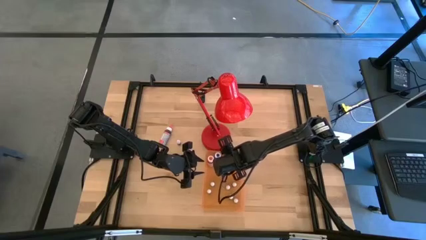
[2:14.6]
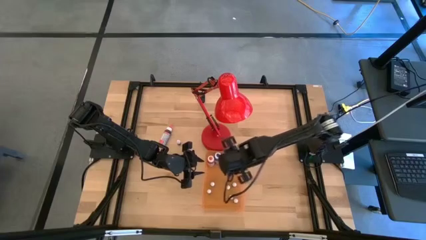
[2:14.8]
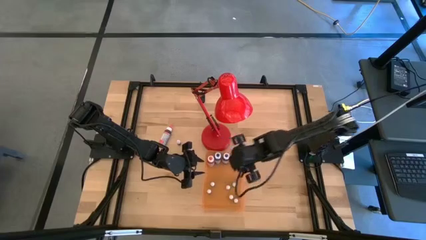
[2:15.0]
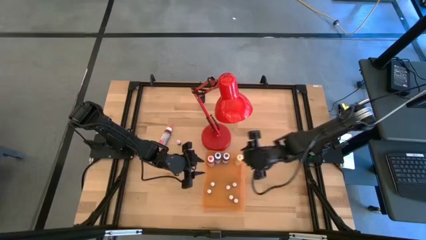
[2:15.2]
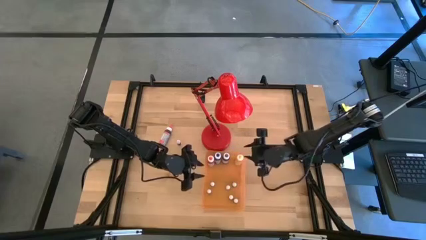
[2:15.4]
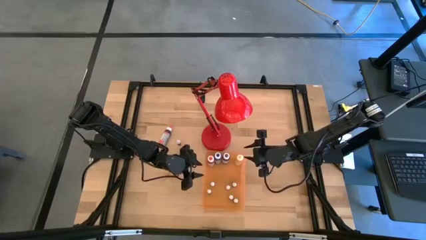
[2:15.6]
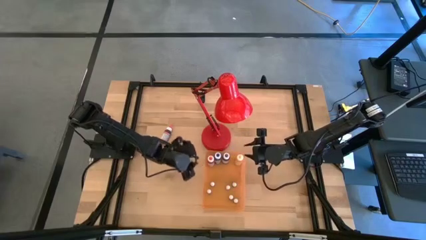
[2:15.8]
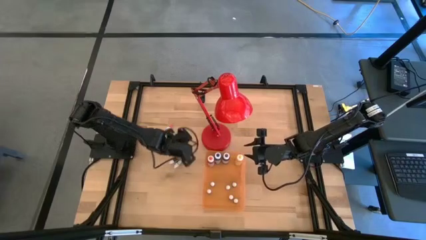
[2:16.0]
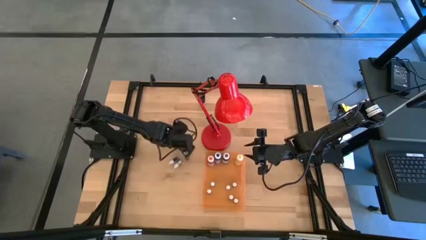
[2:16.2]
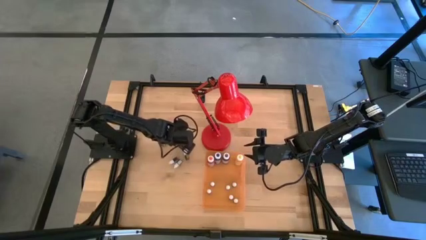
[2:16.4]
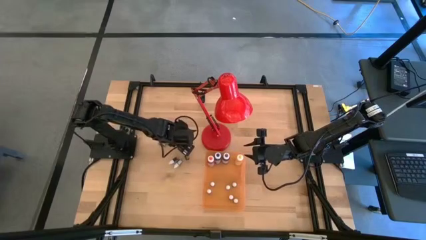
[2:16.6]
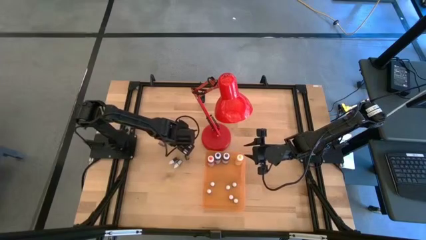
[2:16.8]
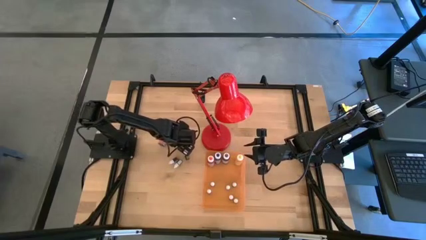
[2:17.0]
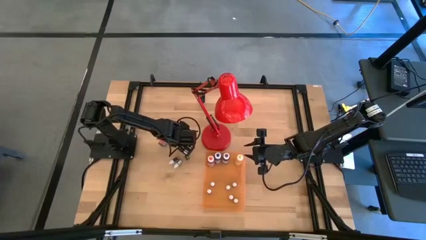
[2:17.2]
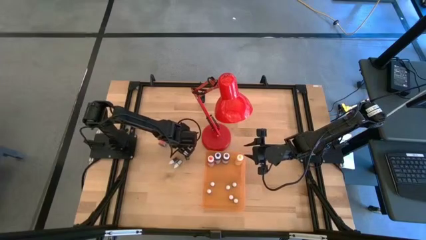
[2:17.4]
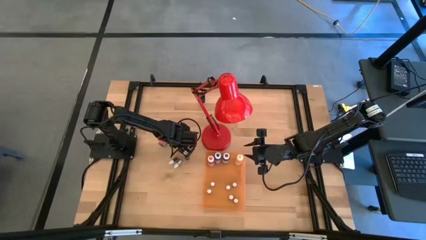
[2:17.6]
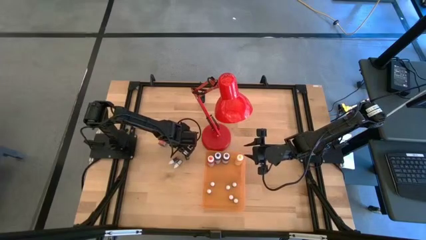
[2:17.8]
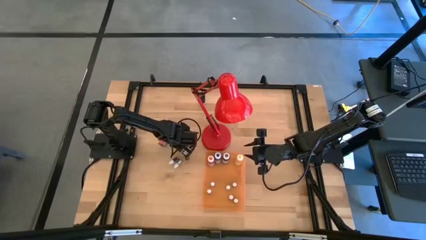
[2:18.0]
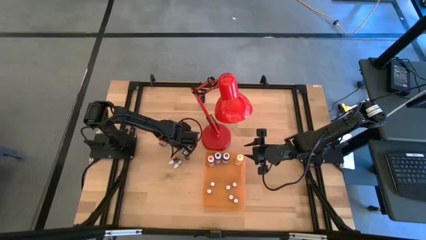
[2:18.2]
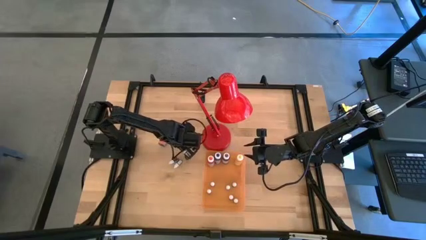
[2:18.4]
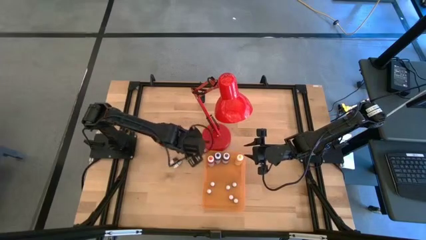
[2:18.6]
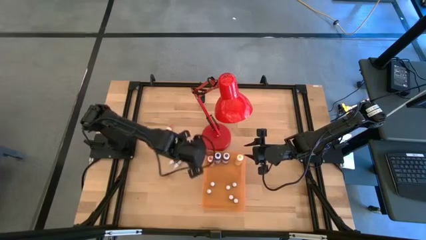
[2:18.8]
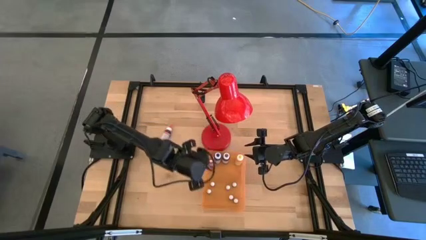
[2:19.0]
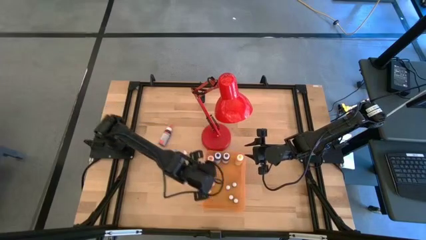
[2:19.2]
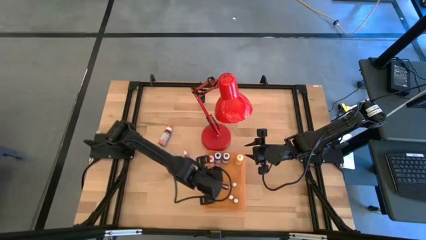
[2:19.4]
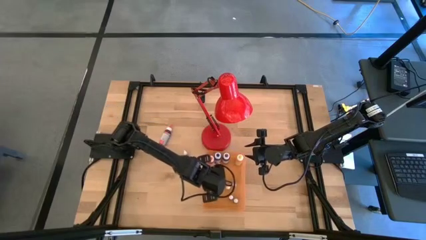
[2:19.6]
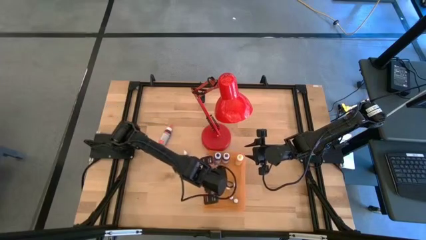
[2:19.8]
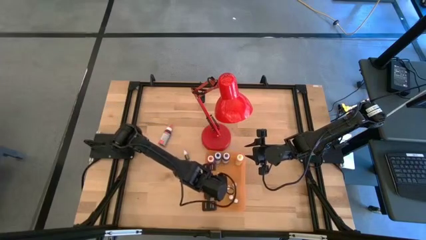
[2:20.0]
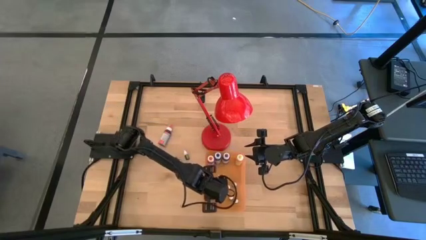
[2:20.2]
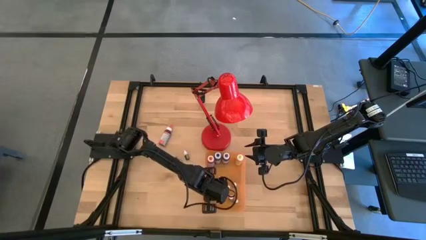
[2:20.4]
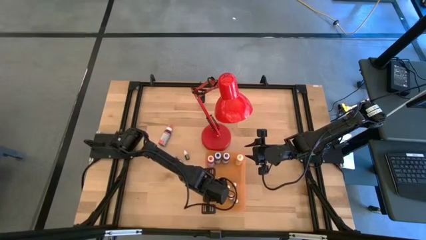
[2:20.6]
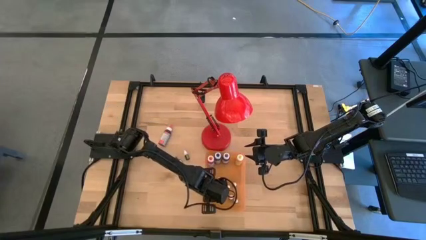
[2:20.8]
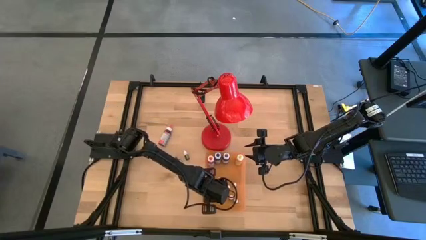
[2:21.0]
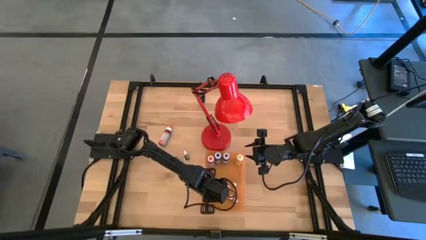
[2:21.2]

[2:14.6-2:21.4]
Task: Pick & Place food coloring
Put the top small black food coloring bottle into the orange bin

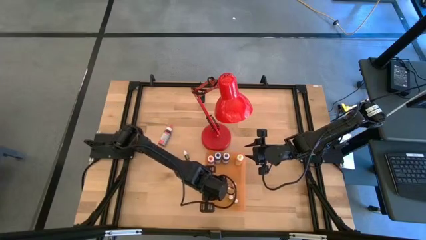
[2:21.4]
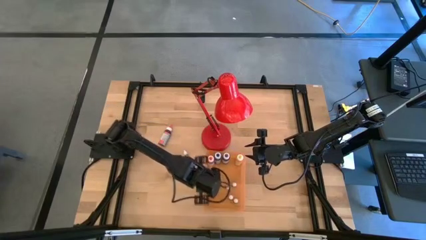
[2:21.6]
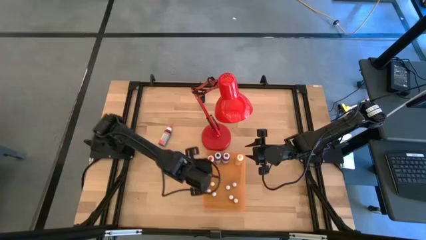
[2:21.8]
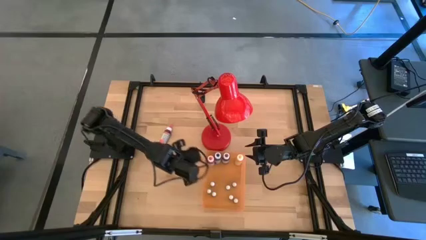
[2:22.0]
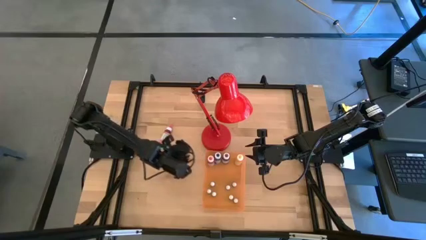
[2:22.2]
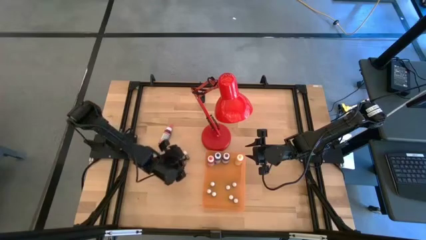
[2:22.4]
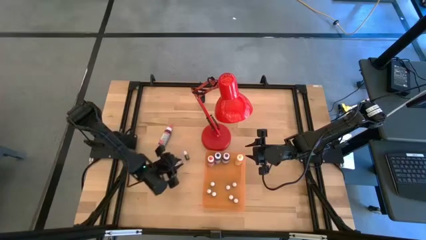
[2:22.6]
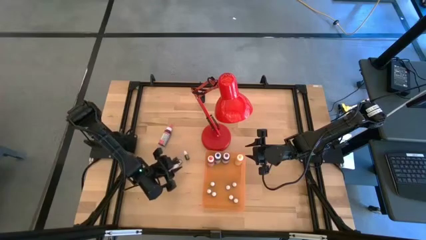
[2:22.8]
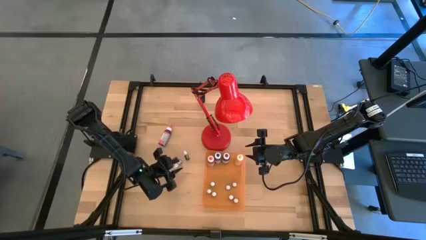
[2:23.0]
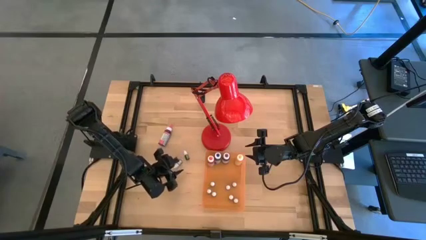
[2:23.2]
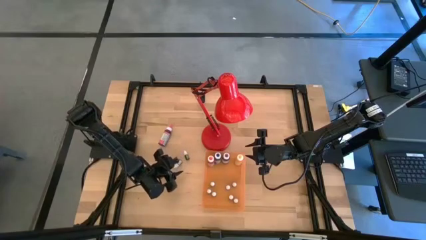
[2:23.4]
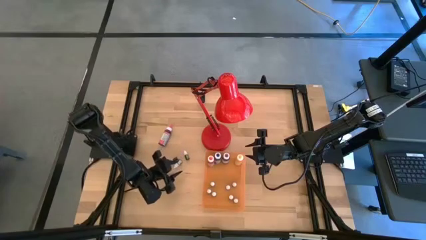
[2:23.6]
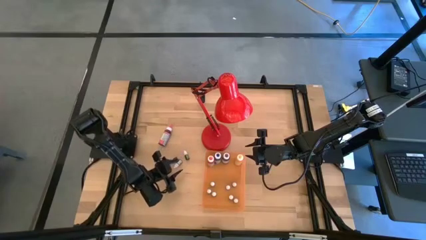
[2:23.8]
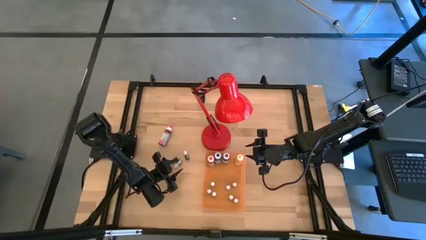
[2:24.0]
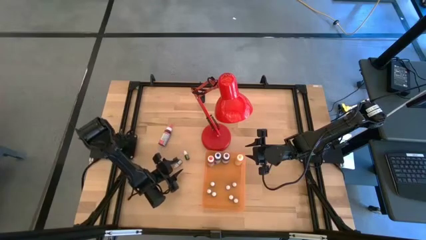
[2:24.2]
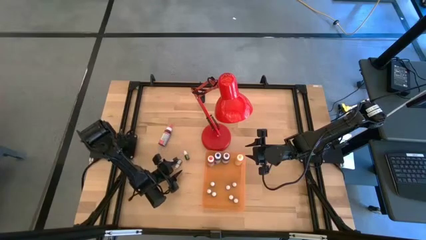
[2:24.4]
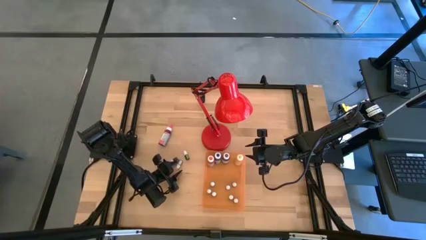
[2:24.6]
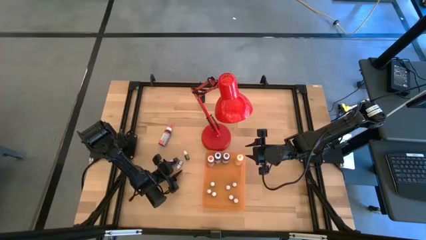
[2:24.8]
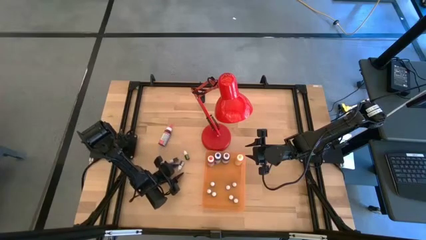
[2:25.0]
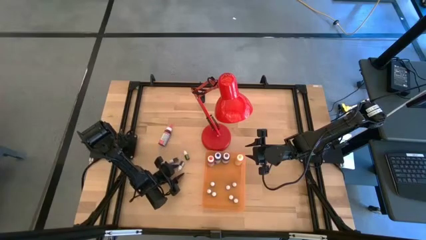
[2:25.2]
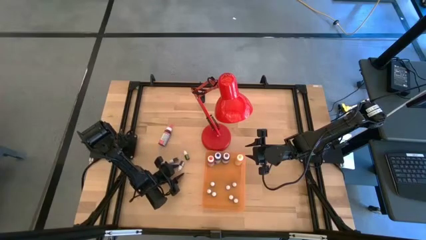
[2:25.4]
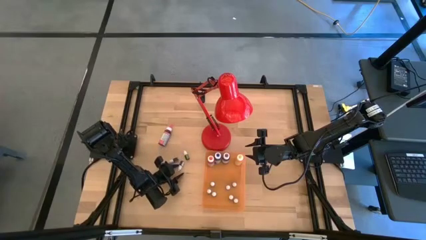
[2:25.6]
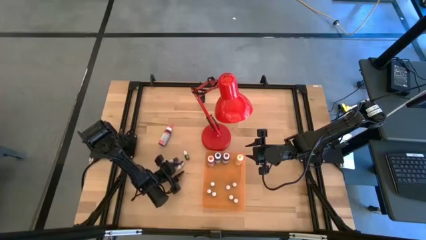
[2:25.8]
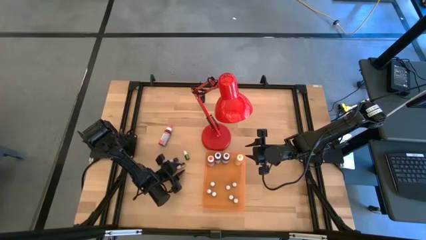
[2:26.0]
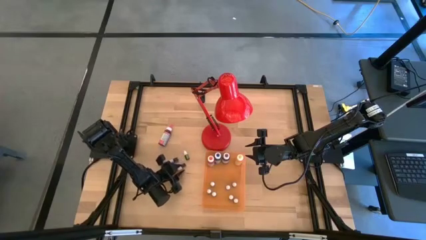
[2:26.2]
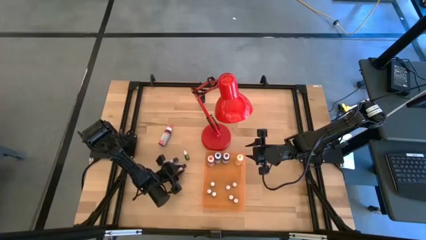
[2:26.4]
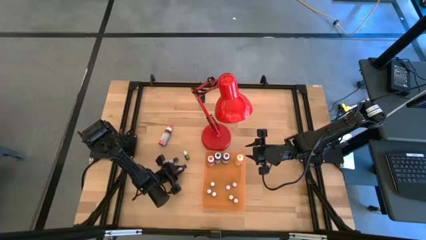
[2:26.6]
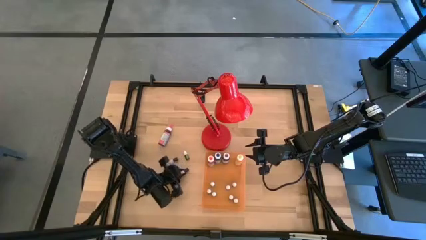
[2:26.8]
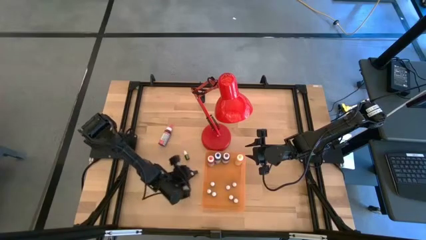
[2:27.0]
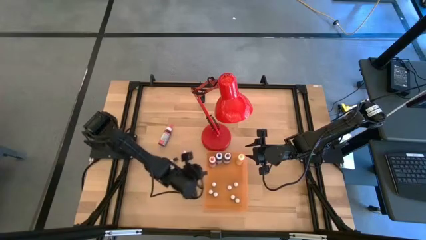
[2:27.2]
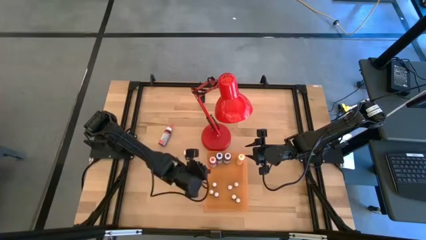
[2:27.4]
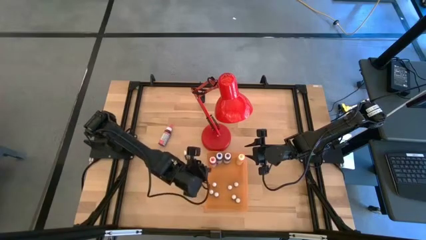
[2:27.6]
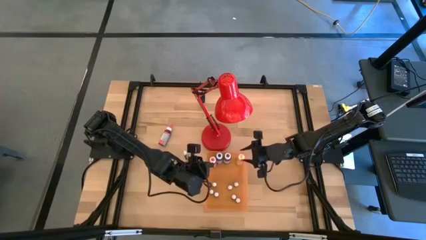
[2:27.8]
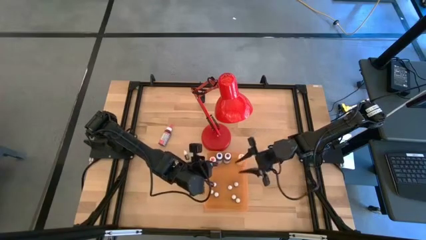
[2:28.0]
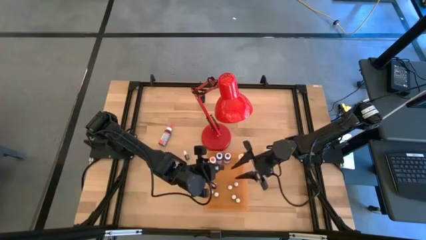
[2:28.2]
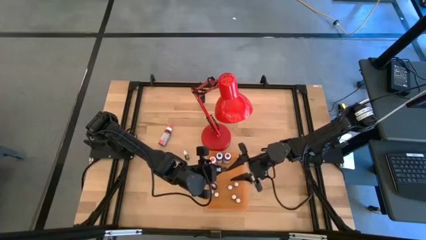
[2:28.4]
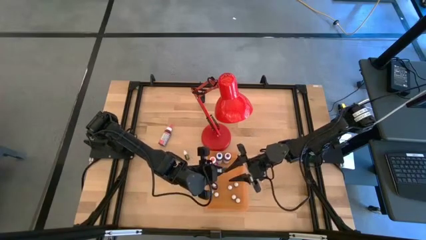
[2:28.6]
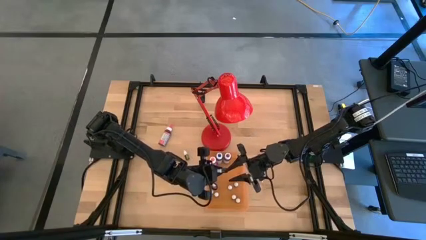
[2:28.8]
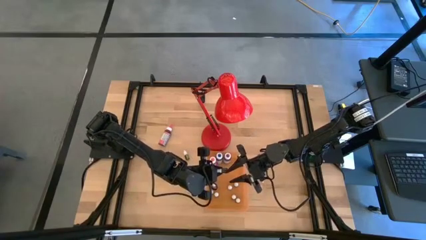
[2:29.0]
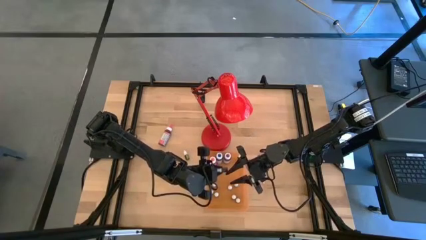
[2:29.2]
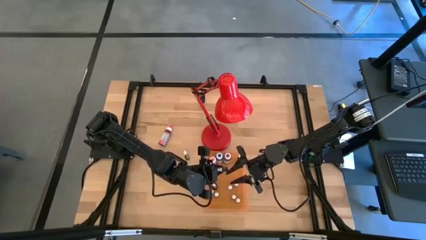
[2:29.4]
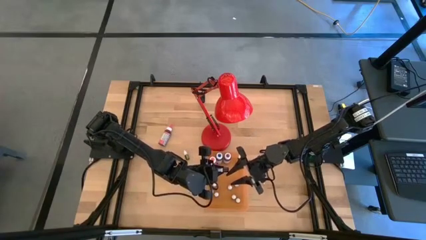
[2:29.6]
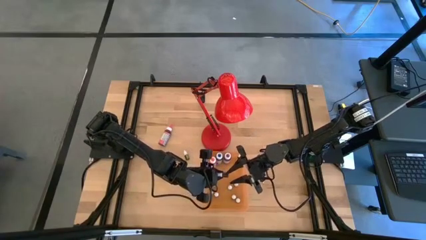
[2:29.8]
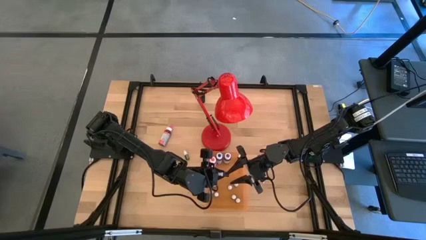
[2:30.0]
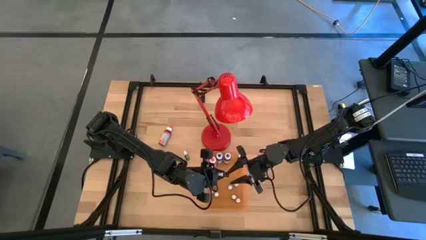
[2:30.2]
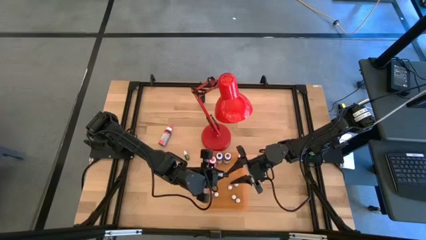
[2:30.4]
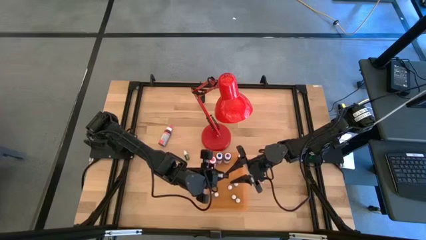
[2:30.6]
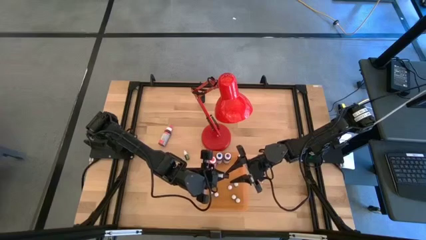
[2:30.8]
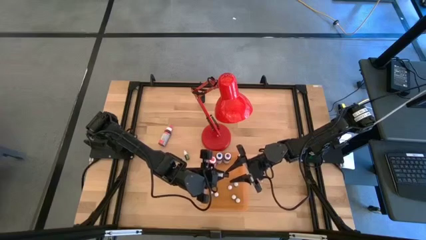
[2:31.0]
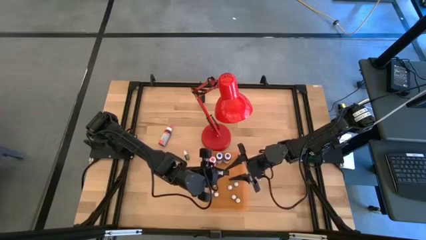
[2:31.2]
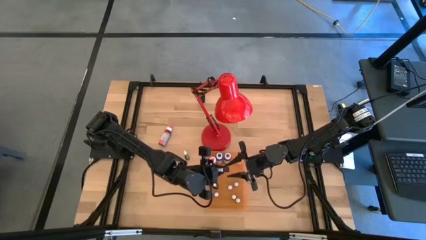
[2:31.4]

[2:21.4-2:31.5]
Put the small black food coloring bottle into the orange bin
